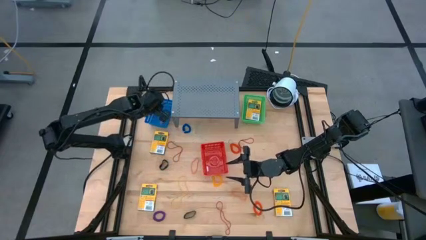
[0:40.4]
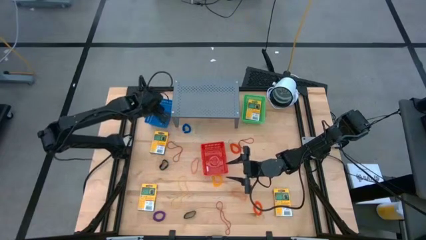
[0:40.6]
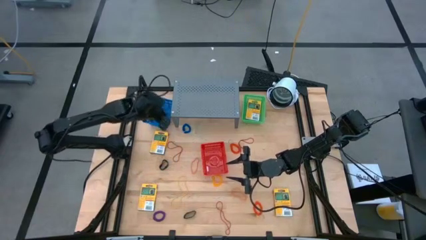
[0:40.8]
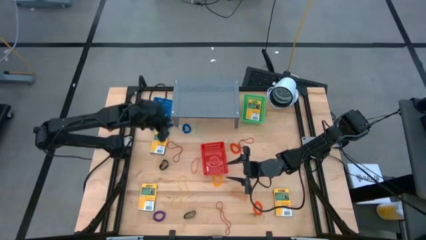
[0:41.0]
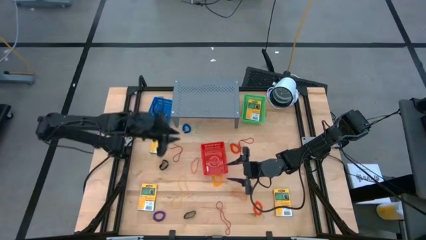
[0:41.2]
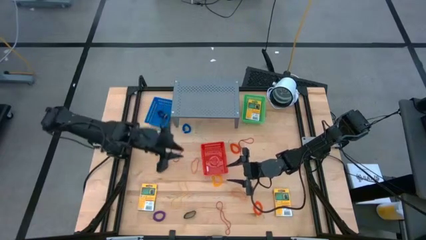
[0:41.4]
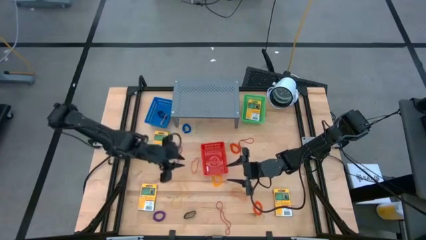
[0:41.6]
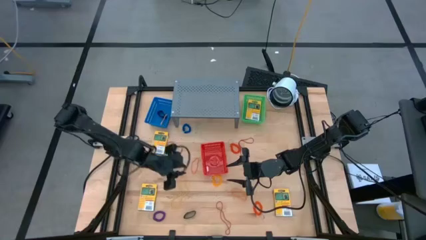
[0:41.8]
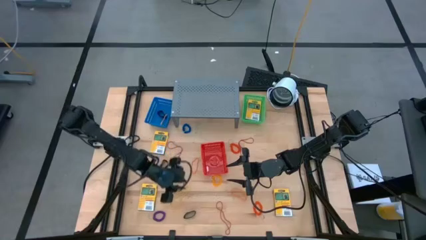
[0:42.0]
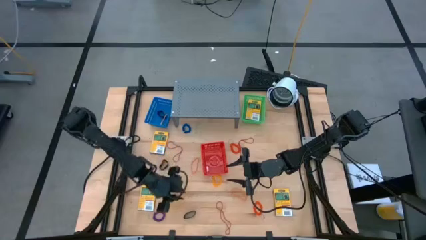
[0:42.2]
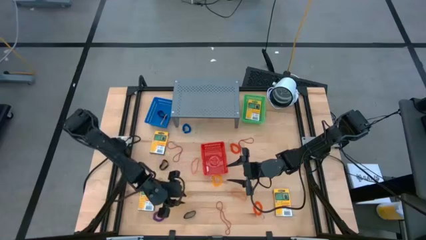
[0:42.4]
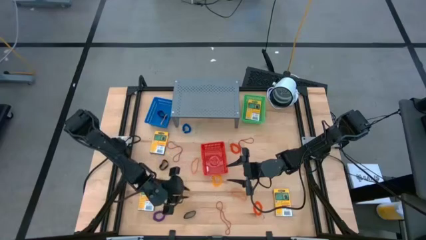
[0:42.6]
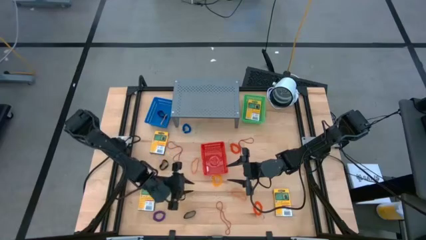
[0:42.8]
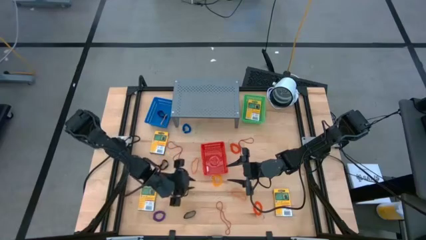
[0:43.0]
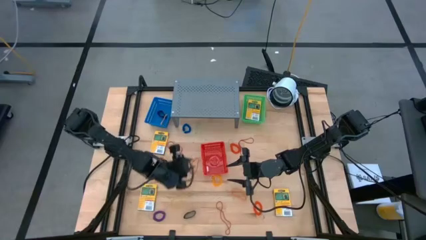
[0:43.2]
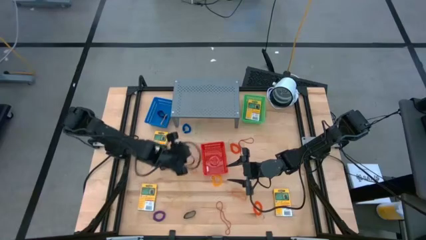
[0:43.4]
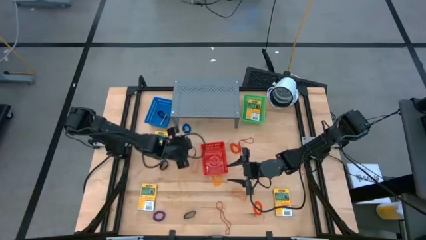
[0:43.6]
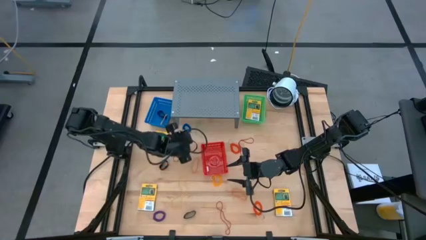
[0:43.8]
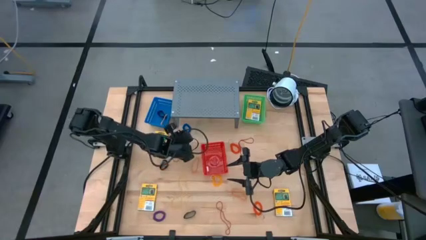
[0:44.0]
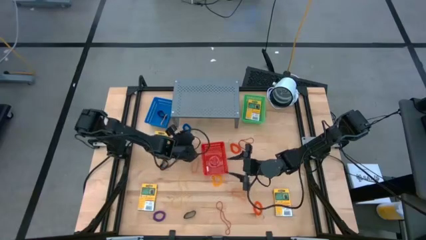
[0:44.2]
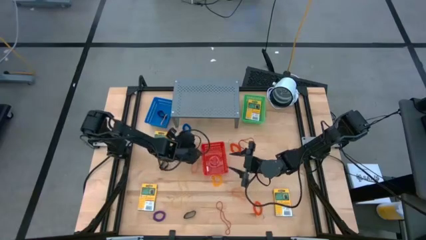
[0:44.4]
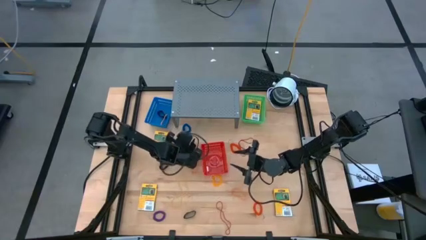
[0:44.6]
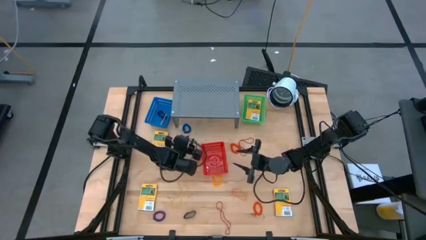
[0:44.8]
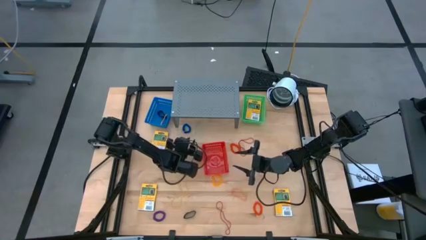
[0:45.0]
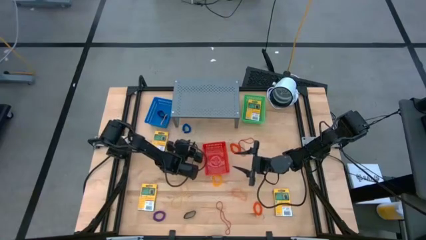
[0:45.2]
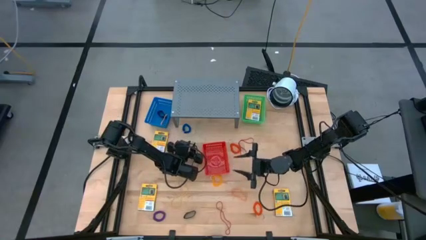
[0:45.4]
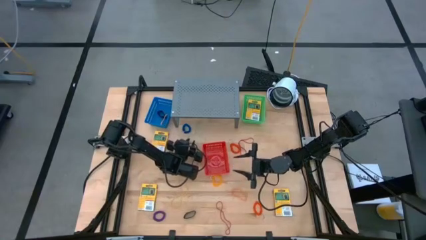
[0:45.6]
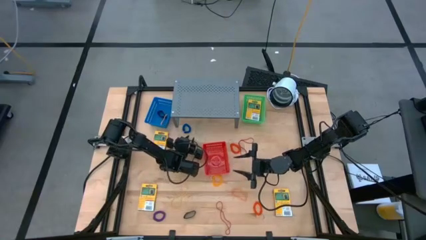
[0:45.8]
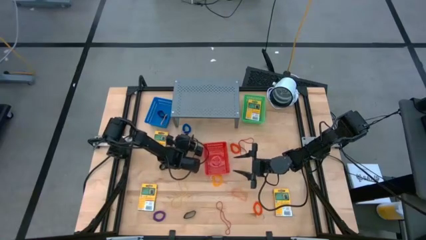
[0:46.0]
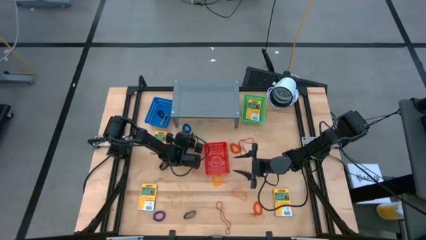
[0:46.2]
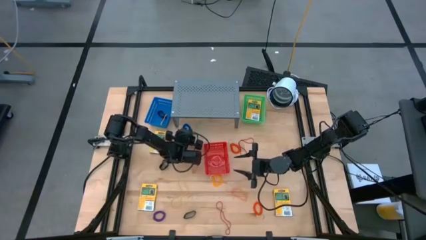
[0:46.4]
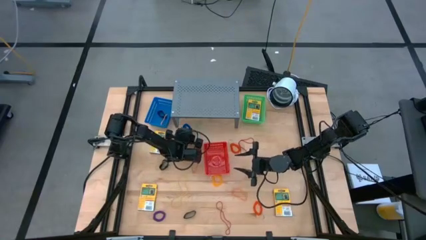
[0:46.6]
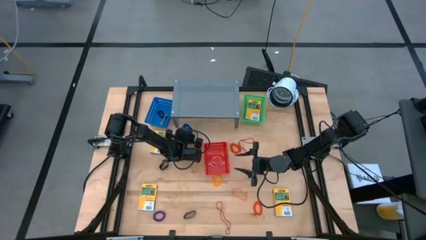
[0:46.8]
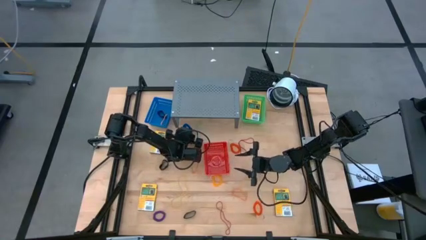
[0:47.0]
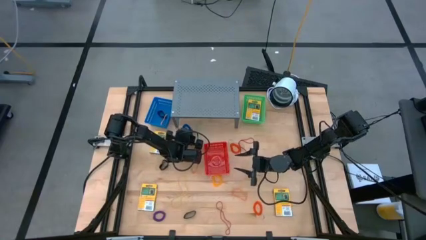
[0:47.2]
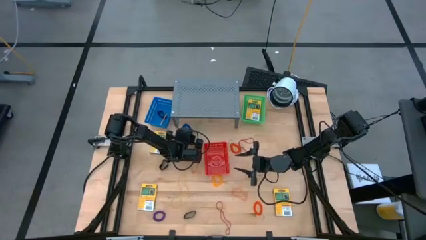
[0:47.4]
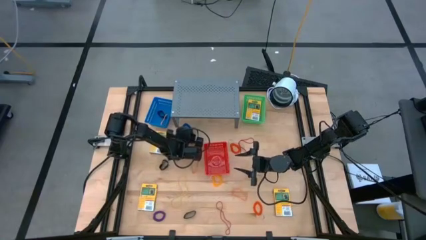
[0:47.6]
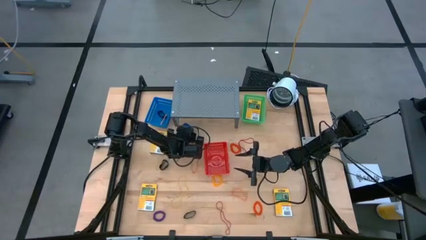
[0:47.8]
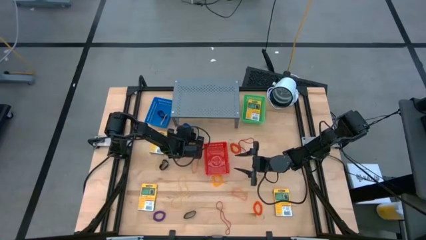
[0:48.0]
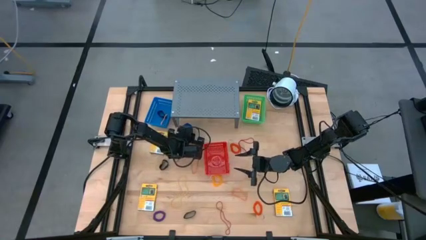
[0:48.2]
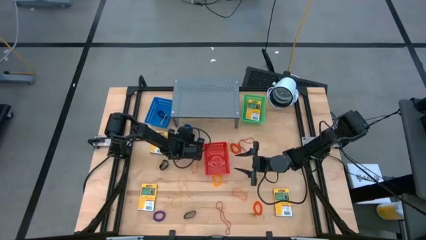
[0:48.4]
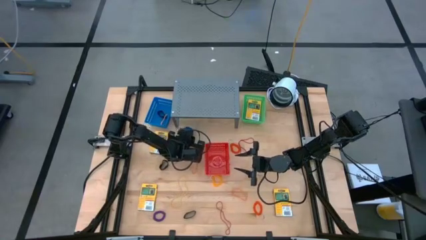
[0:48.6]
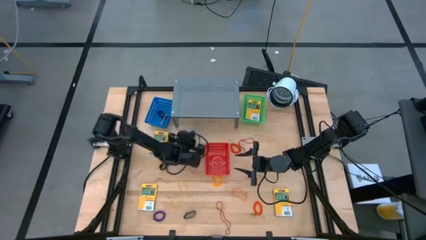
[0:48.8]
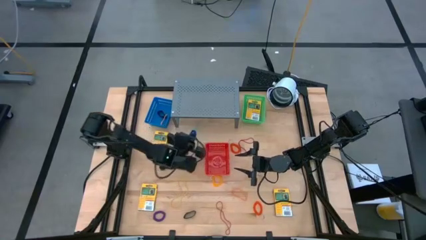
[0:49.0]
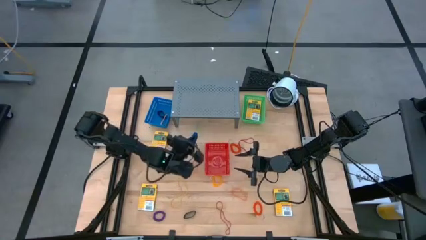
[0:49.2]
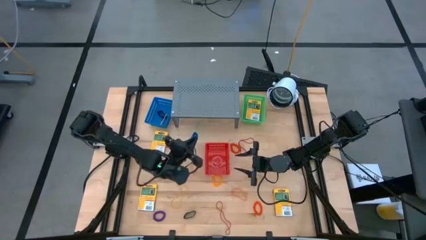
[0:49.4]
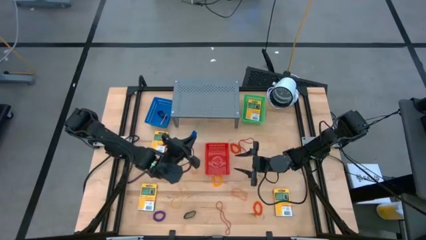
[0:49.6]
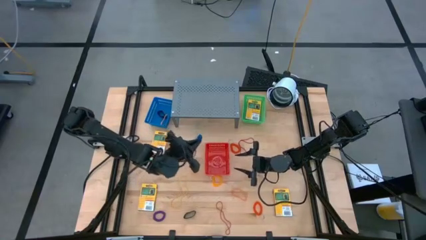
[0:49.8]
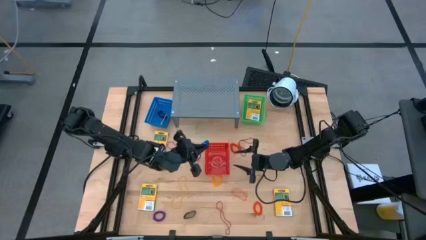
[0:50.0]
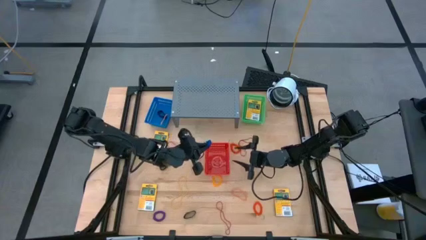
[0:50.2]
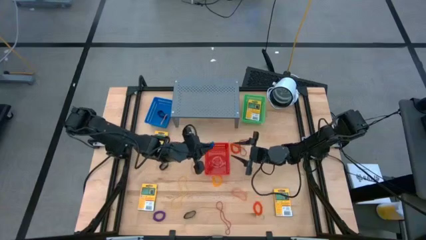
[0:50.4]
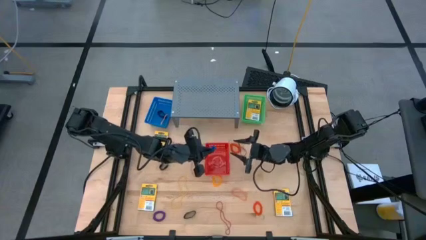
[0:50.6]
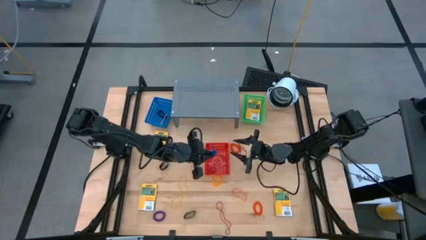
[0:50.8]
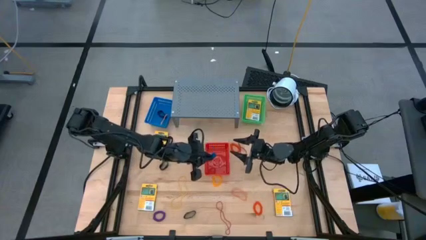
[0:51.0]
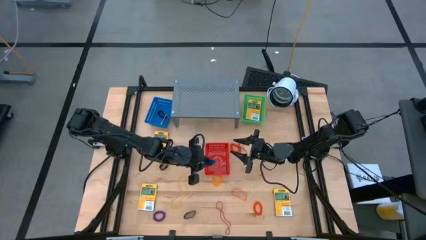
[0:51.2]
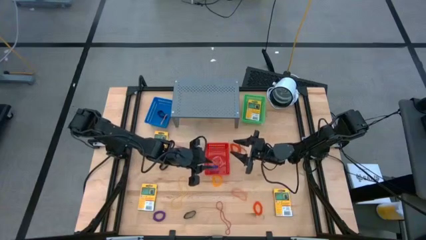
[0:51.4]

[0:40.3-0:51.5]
Task: Pick & Place Office Desk Supplies
Put the blue spring keychain into the red basket

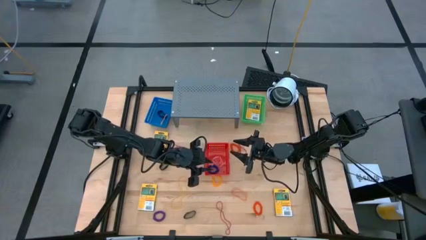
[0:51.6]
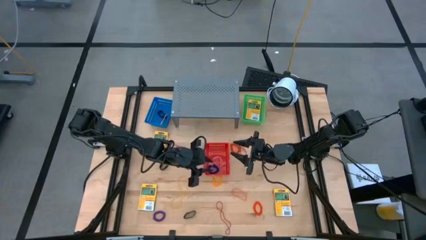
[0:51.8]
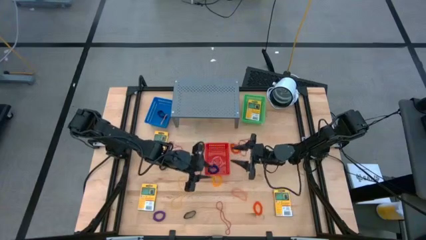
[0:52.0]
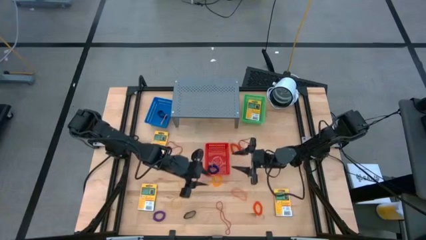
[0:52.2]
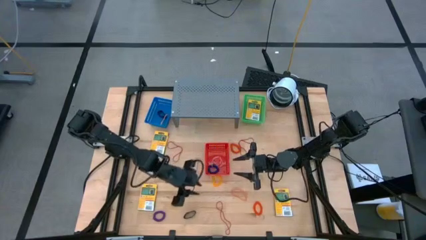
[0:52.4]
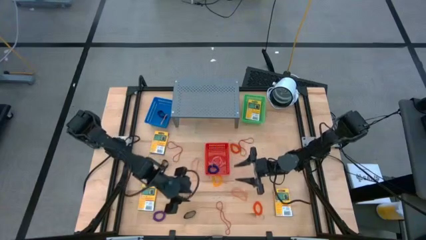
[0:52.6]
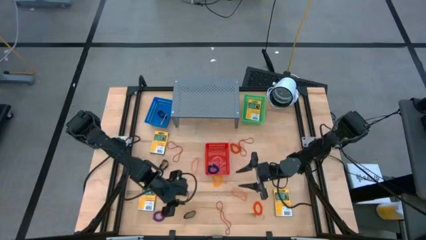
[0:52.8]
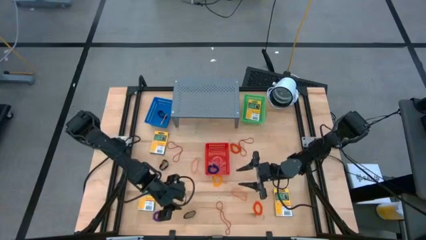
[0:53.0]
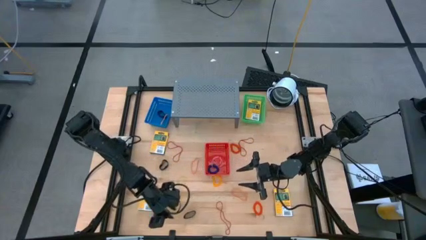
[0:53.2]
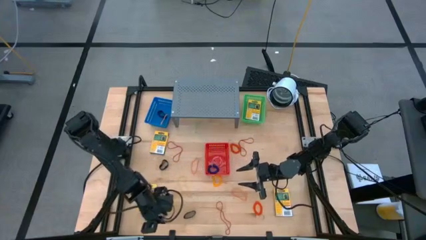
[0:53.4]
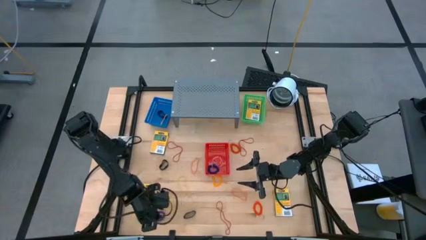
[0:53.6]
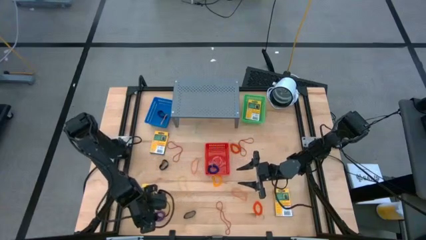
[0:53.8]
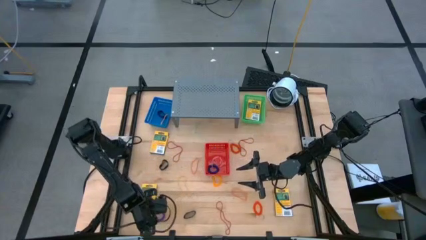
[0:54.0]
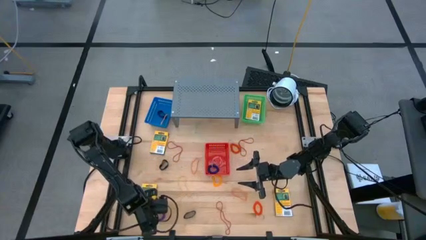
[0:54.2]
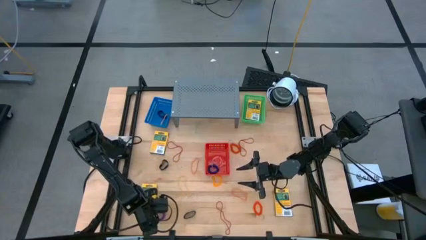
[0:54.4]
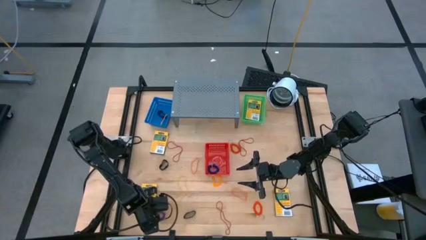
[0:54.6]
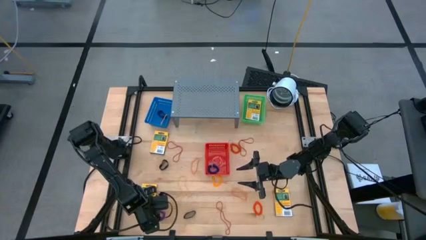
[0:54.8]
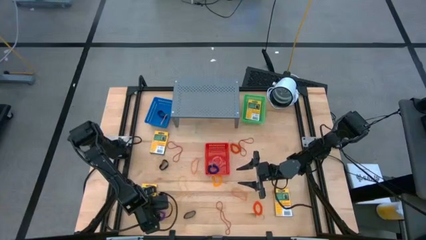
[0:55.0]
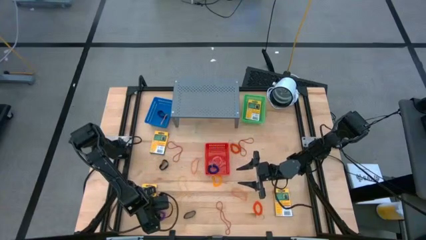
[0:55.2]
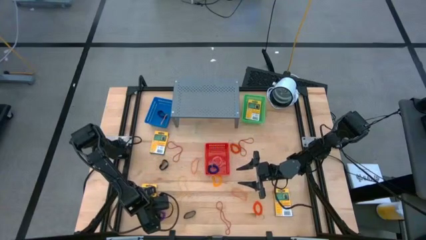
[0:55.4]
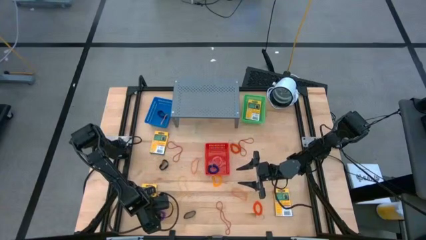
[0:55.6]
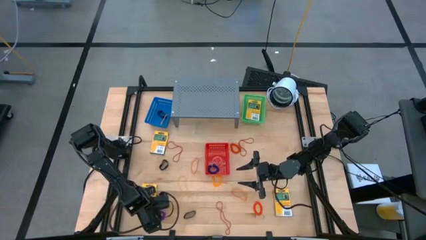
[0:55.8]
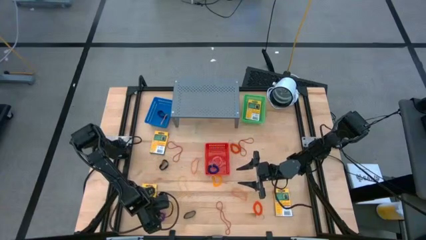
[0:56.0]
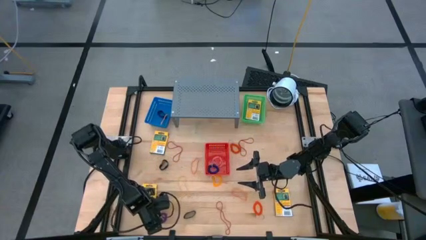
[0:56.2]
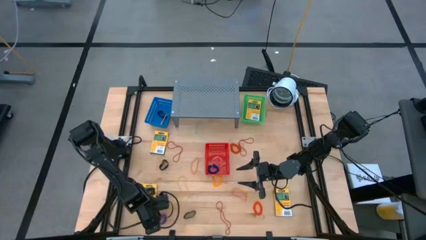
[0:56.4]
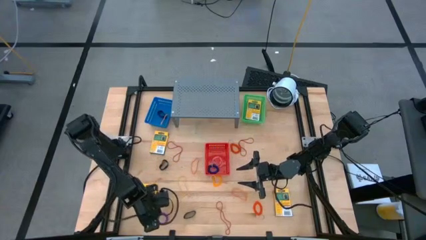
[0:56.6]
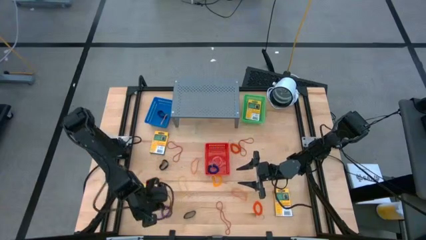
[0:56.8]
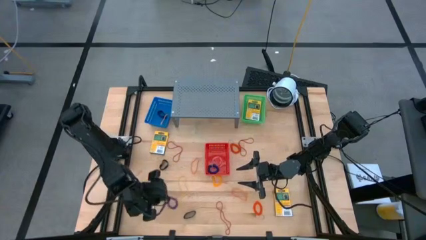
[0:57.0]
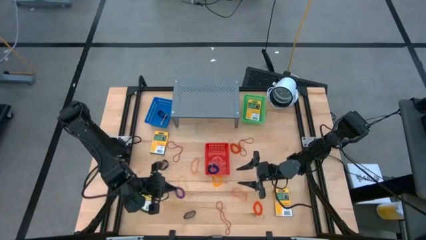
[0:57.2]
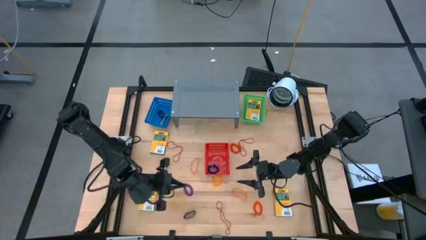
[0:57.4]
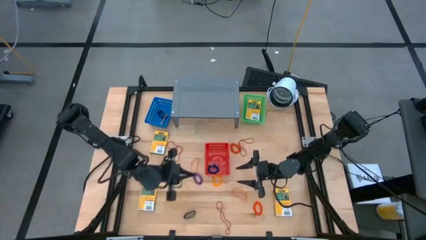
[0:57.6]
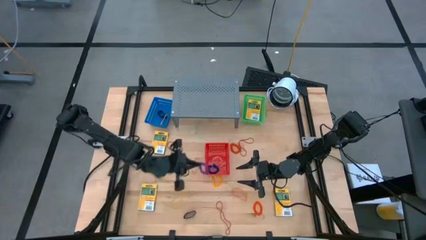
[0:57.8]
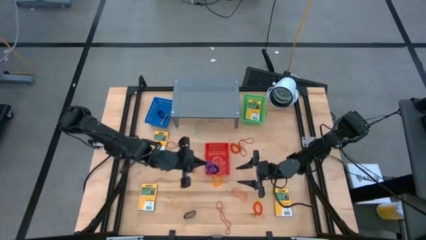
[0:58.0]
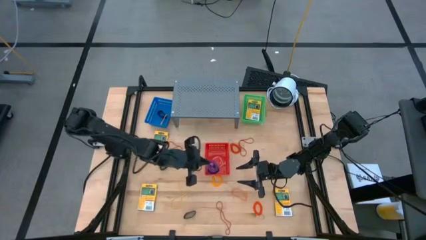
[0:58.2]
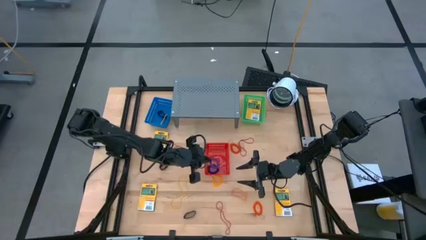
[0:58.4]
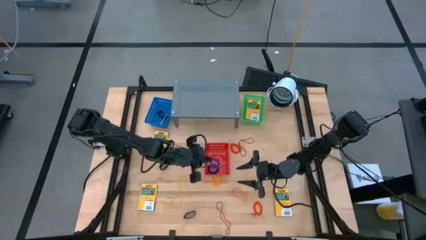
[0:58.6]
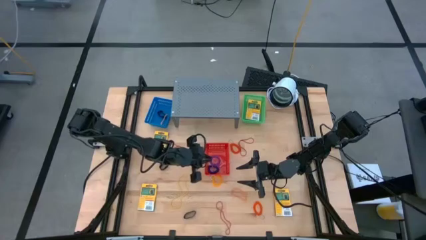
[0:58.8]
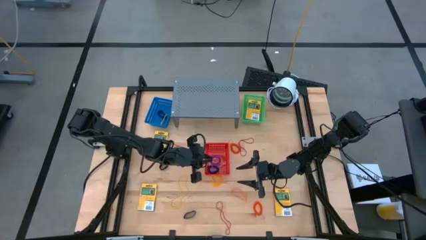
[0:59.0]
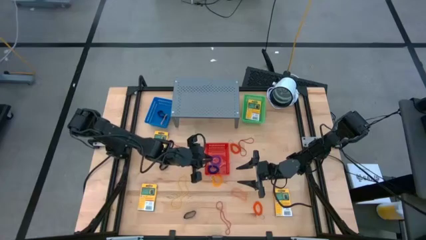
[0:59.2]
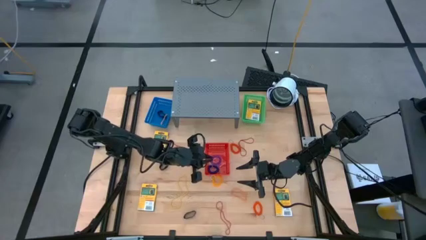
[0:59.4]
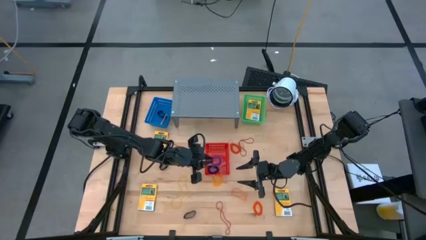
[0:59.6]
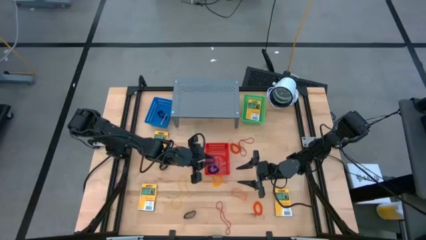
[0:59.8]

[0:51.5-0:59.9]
Put the purple spring keychain into the red basket
